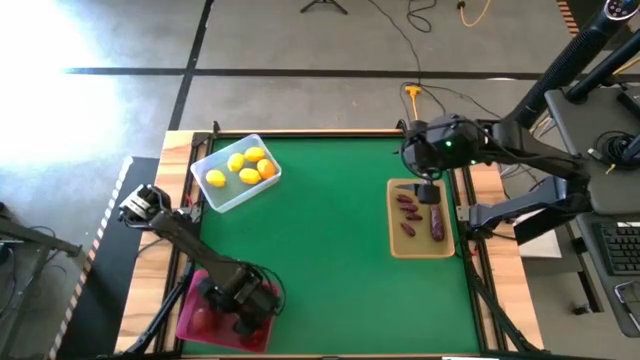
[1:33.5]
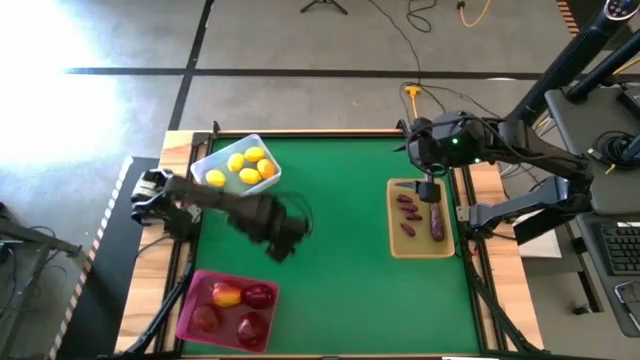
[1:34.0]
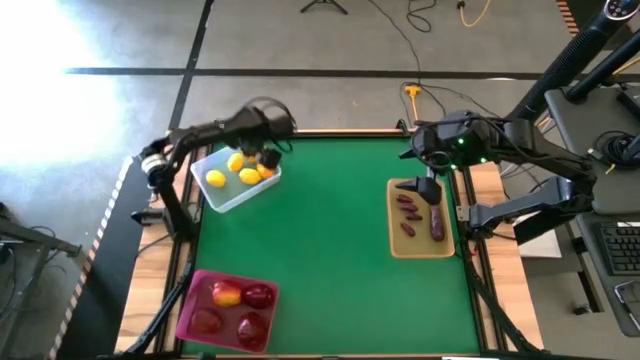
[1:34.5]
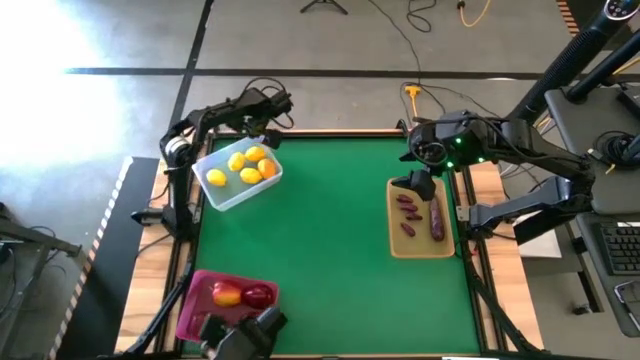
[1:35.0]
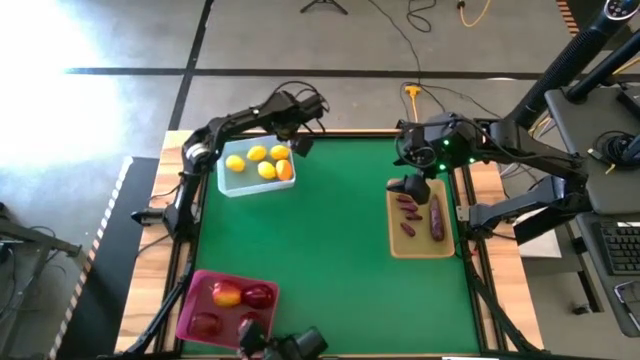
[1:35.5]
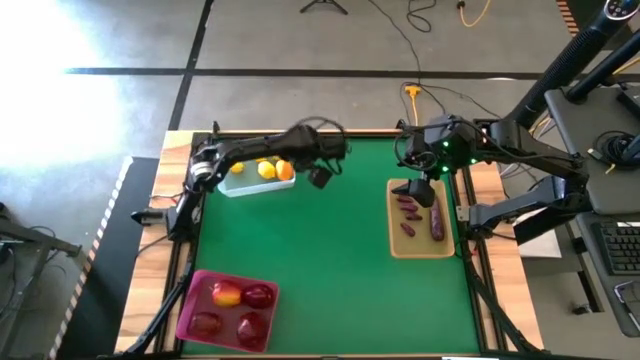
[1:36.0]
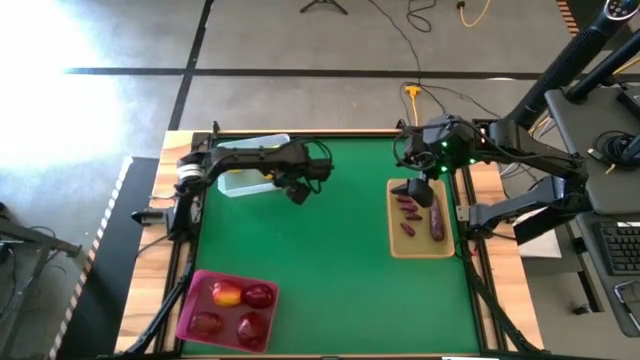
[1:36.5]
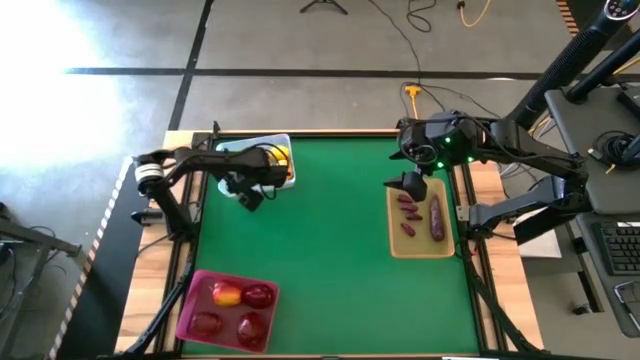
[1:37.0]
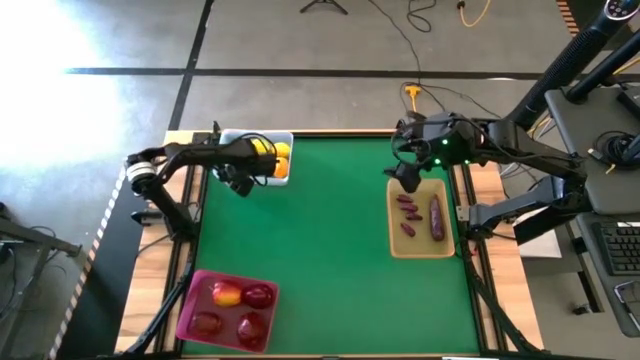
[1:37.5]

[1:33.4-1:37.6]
Task: Sort produce into baskets
Adjust the transparent bin

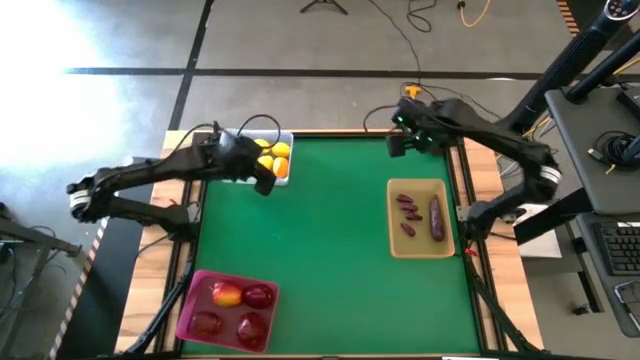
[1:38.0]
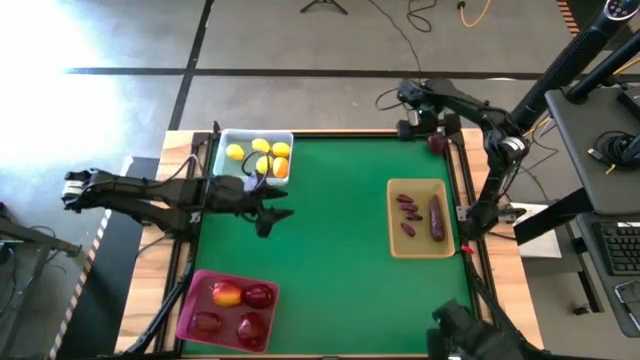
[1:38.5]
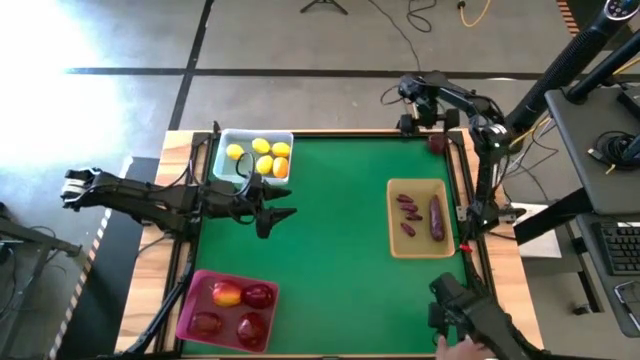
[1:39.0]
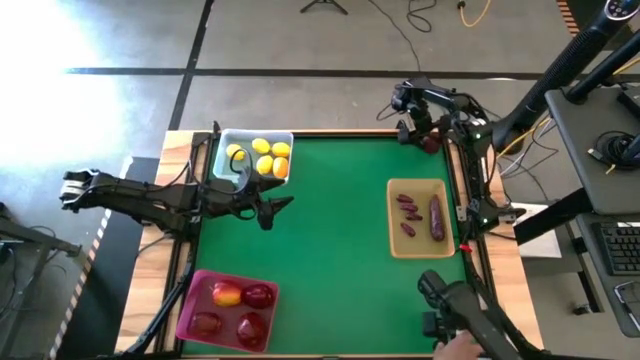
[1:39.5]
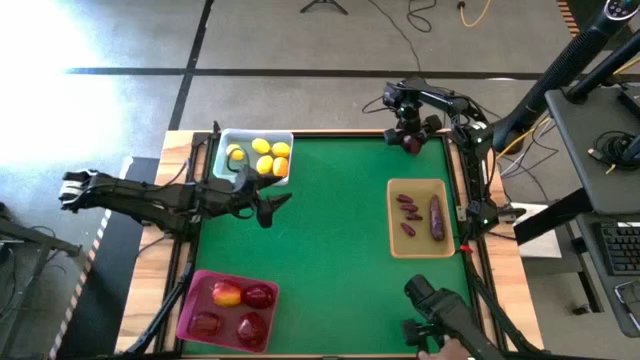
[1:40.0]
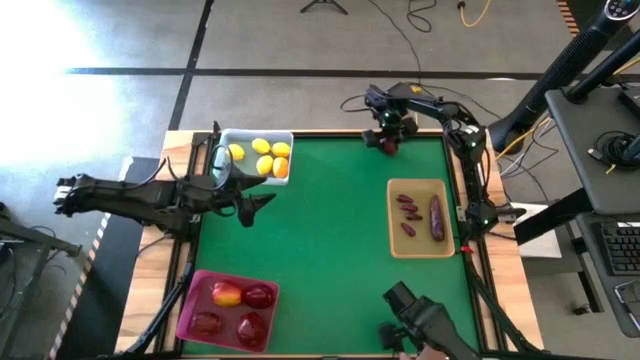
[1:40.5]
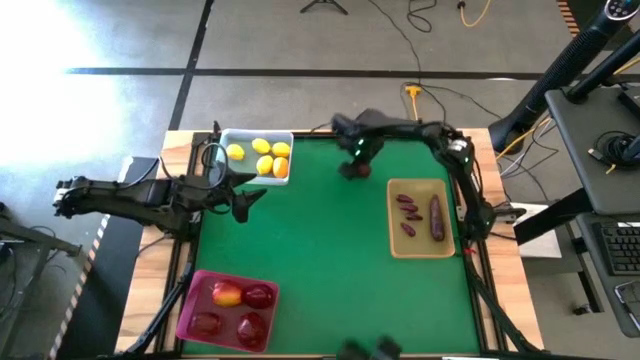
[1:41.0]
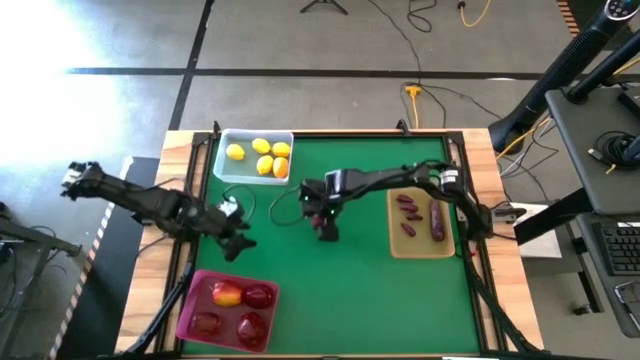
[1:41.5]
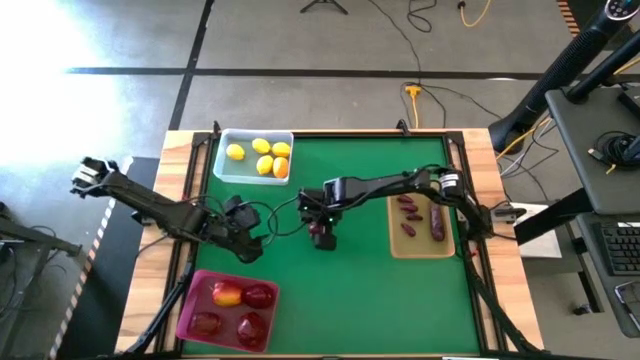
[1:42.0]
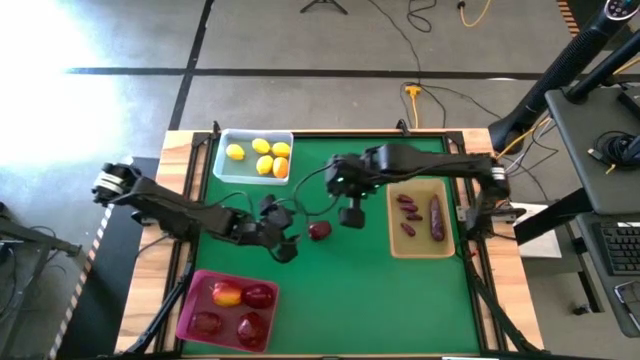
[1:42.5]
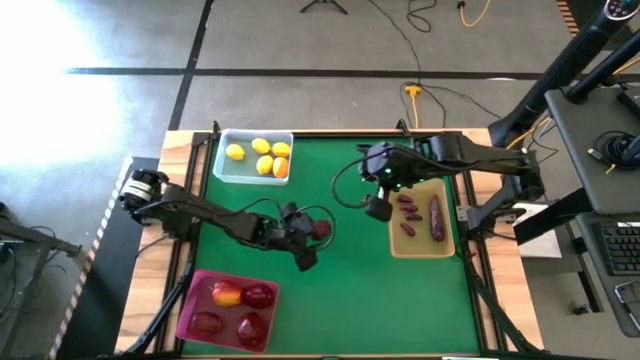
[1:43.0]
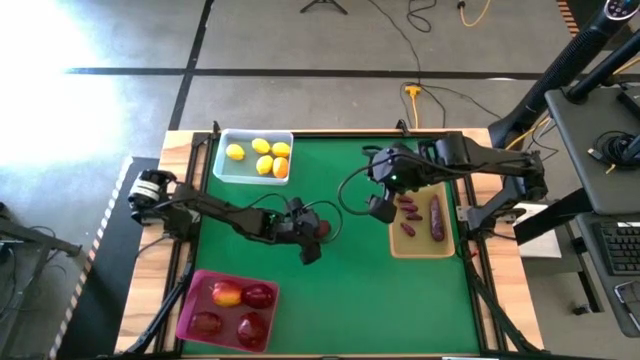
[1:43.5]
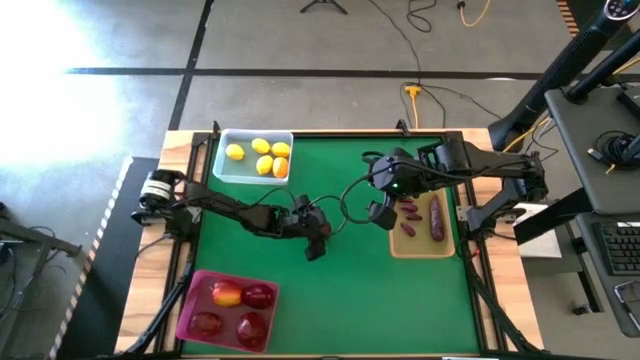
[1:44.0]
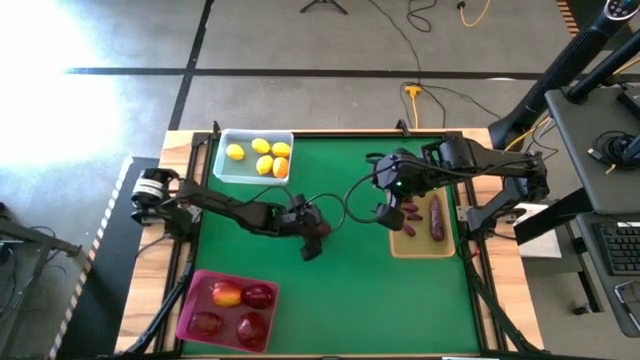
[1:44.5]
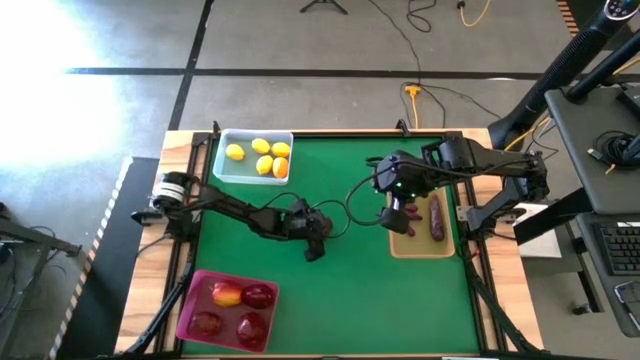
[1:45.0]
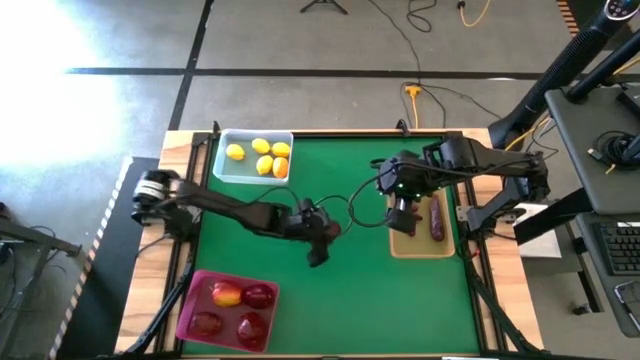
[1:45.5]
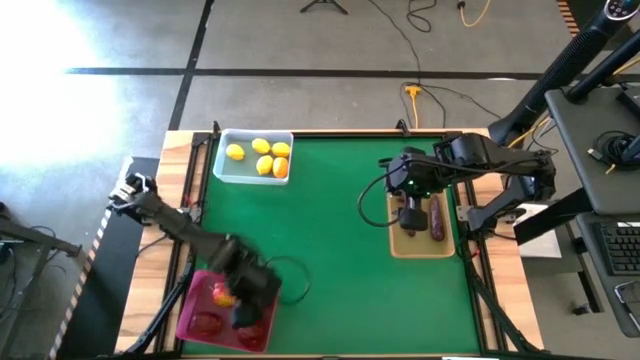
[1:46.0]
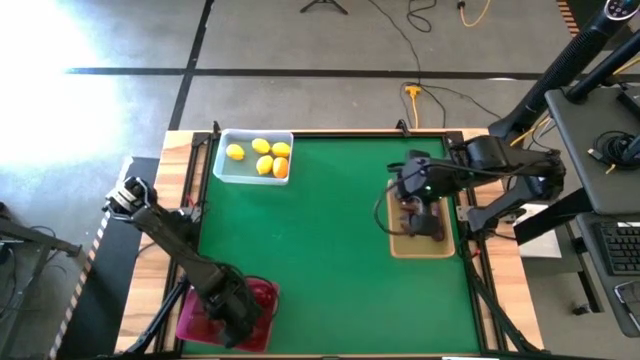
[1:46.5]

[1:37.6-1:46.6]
Put the apple into the pink transparent bin

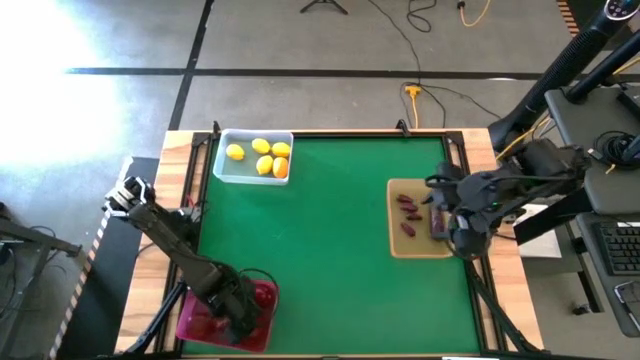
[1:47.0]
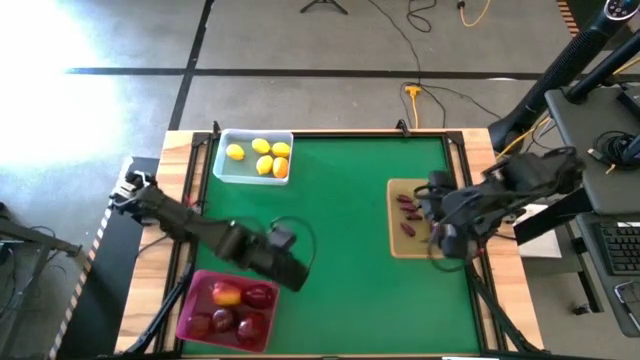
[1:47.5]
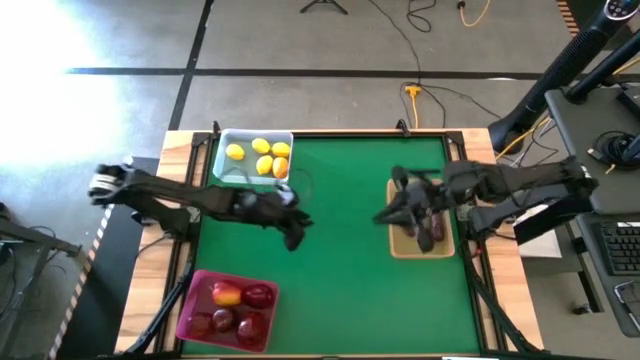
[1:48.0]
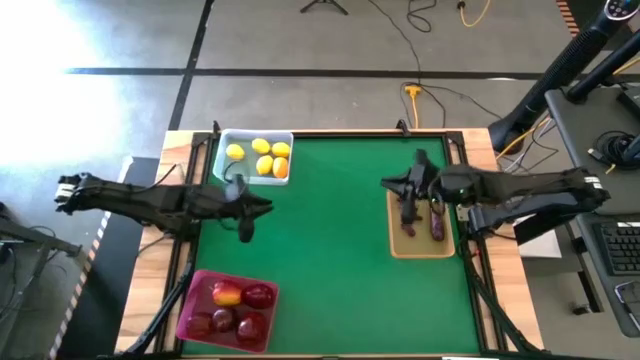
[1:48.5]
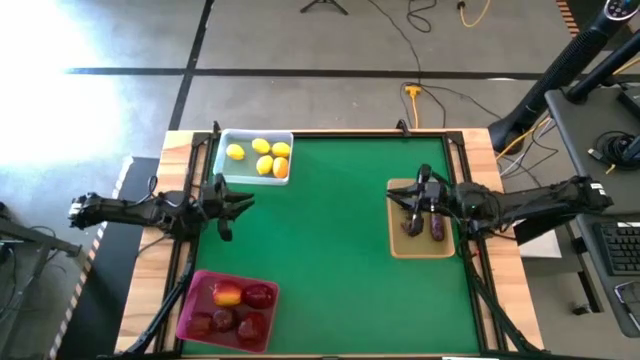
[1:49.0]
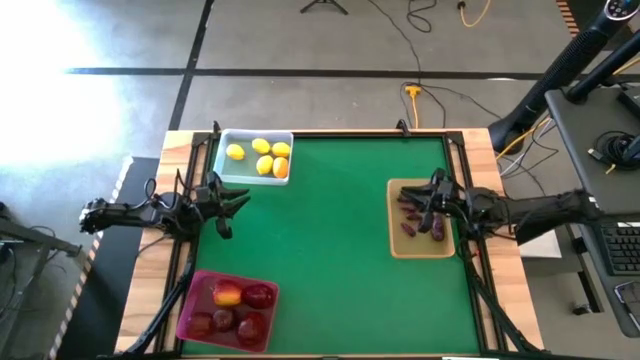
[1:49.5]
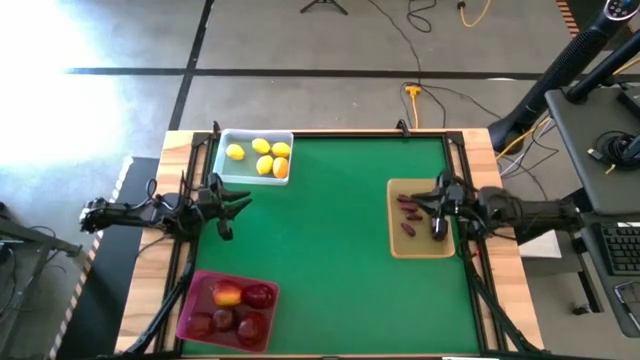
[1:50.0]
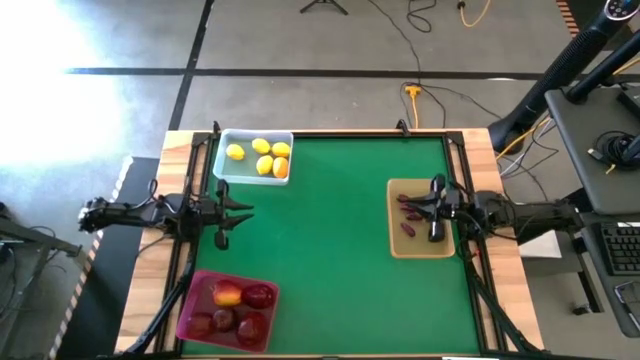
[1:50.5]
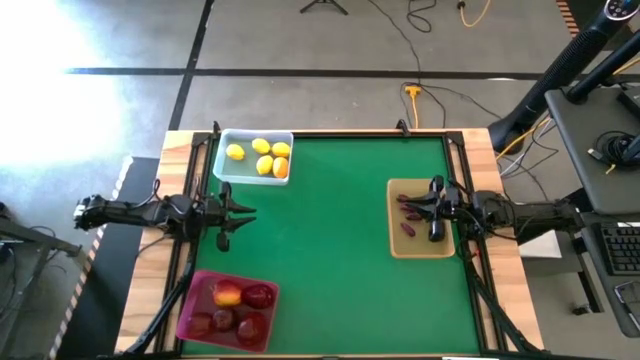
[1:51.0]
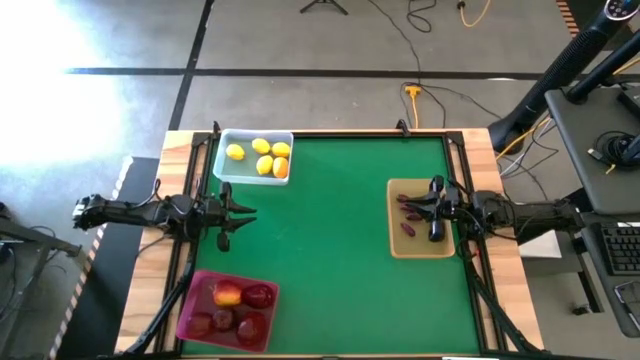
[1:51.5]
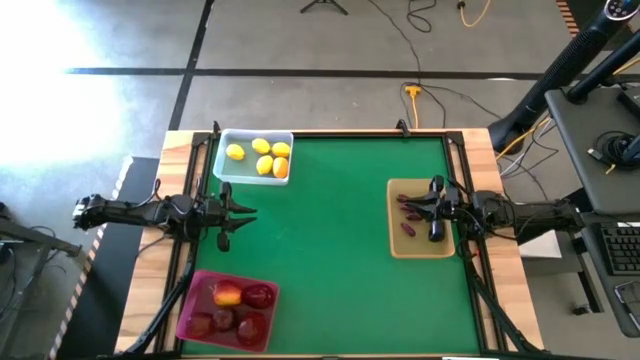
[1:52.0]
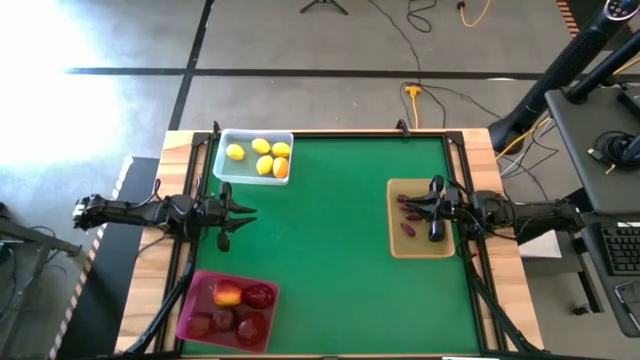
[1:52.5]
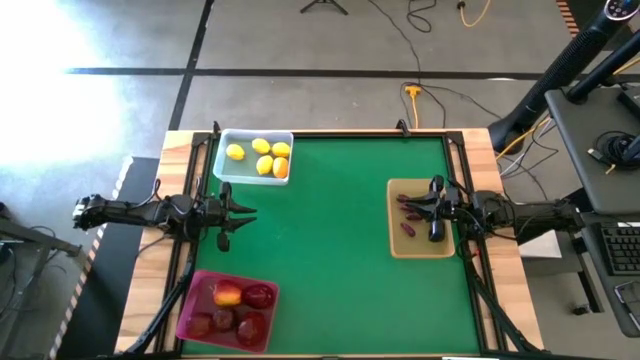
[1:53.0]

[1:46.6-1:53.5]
Return to Home Position

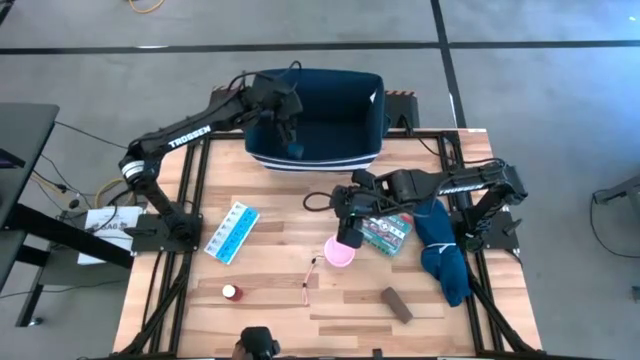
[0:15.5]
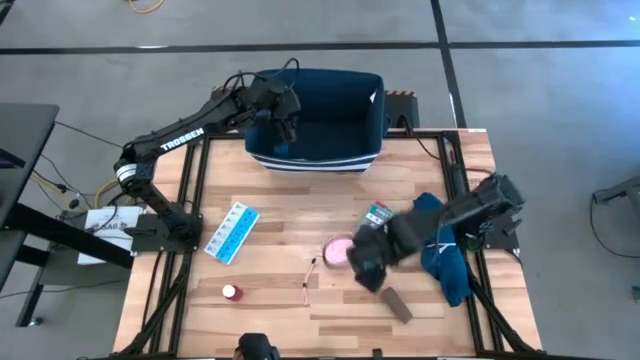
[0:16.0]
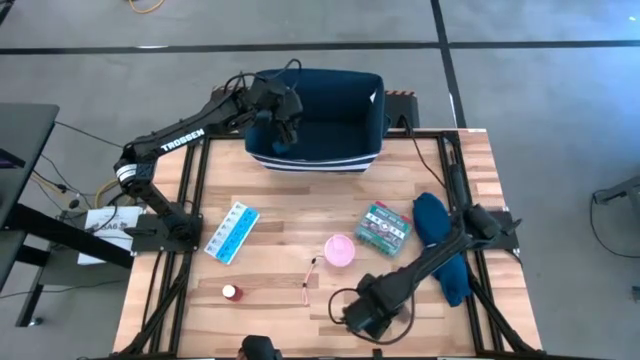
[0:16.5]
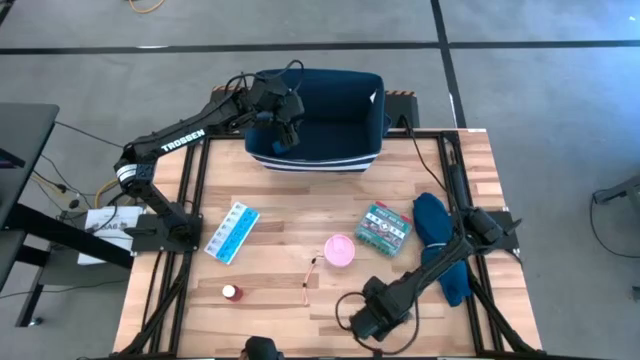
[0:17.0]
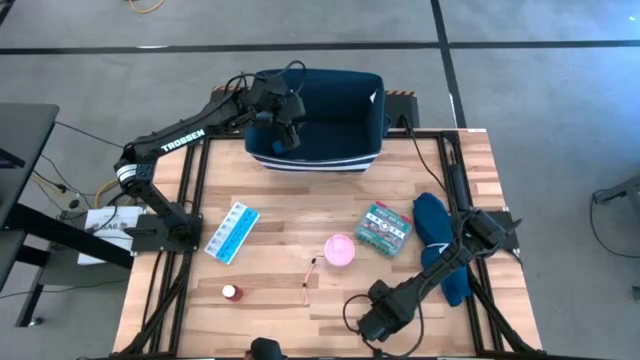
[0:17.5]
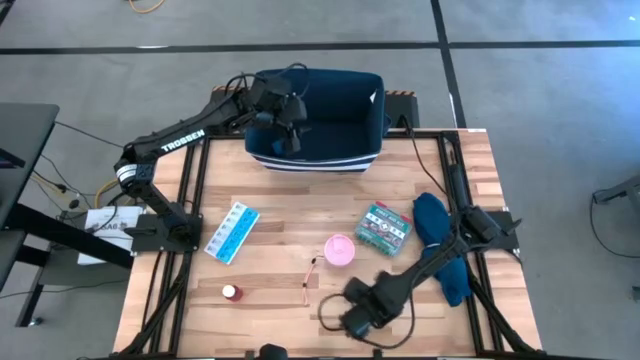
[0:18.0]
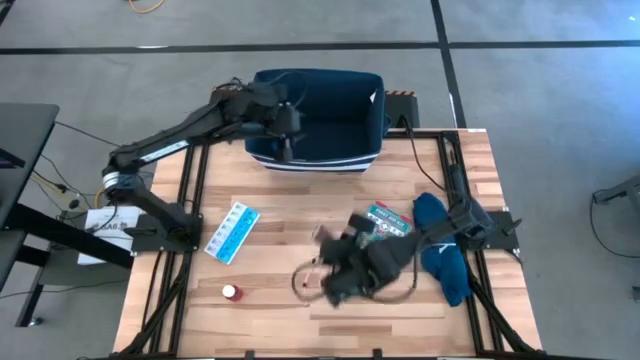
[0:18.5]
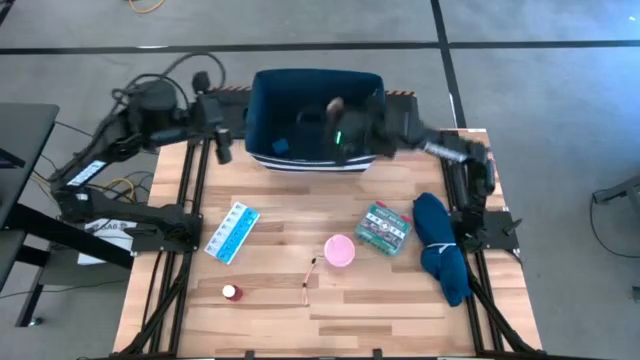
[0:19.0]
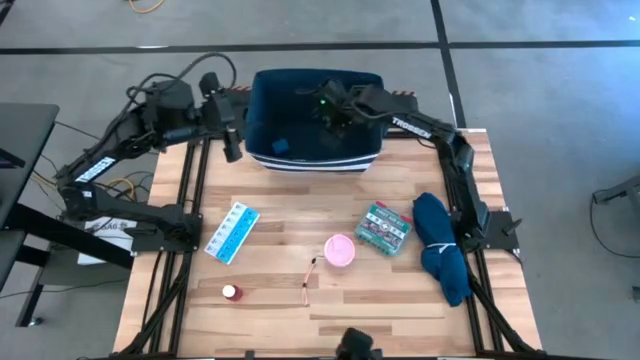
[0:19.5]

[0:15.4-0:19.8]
Task: Pick & place medical supplies in basket/bin
Put the brown bandage in the blue bin
